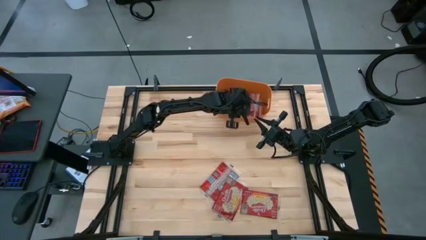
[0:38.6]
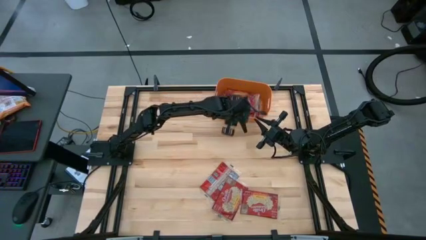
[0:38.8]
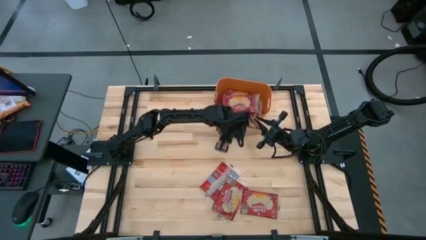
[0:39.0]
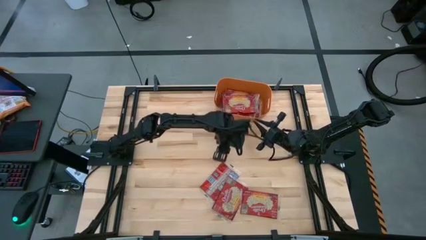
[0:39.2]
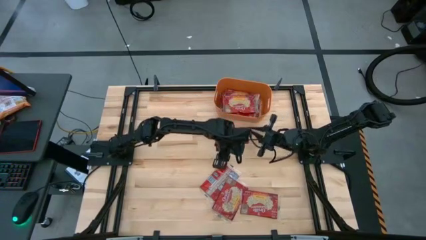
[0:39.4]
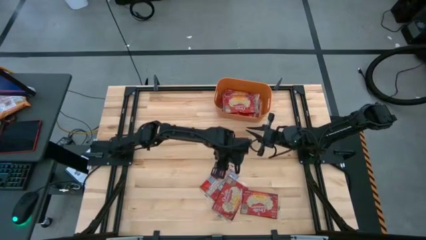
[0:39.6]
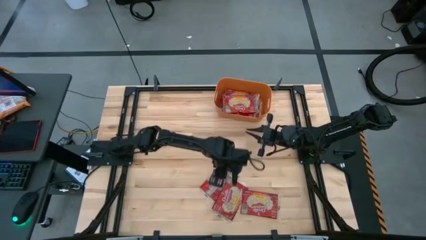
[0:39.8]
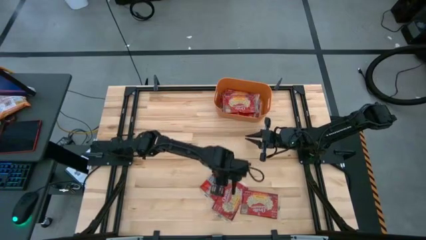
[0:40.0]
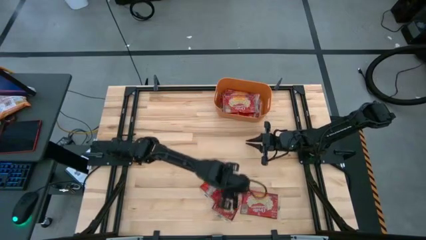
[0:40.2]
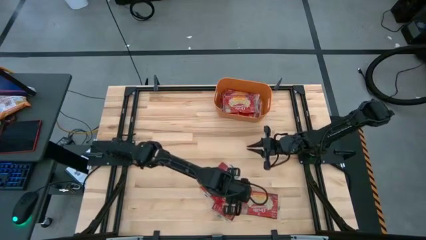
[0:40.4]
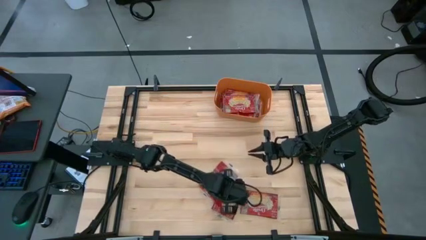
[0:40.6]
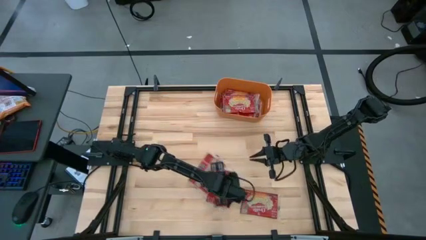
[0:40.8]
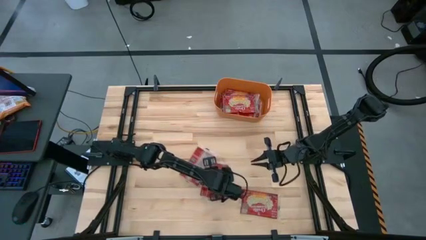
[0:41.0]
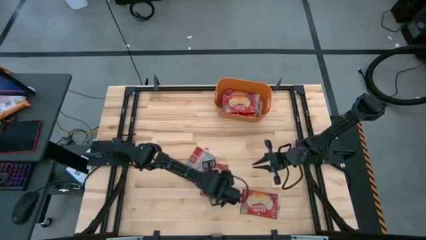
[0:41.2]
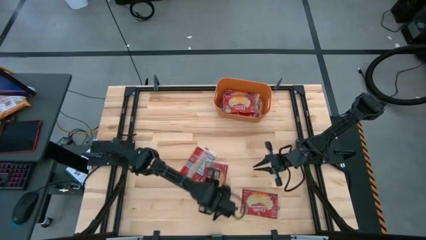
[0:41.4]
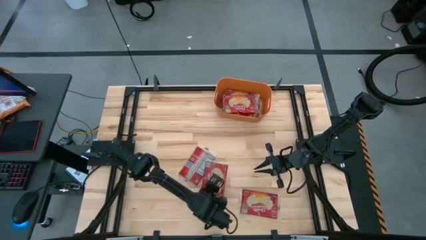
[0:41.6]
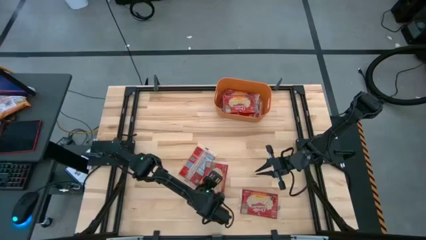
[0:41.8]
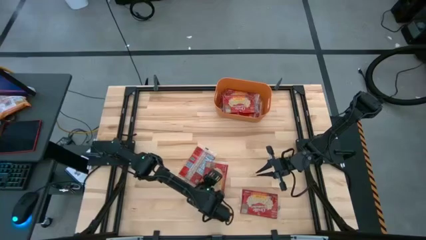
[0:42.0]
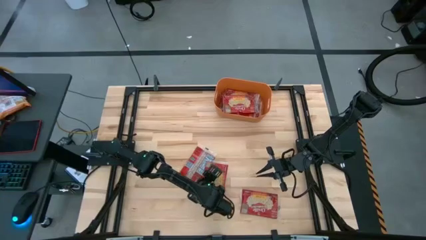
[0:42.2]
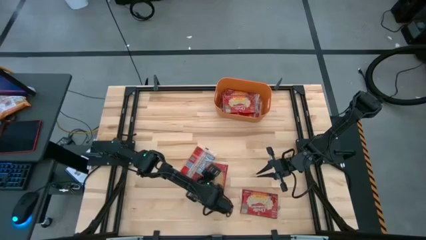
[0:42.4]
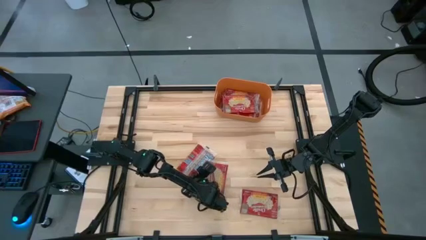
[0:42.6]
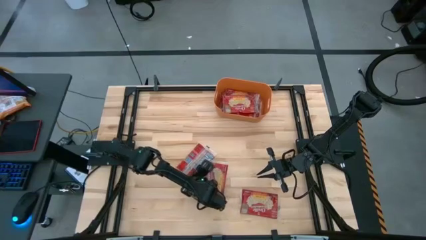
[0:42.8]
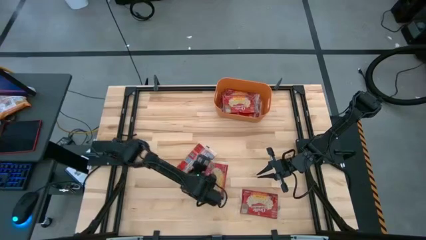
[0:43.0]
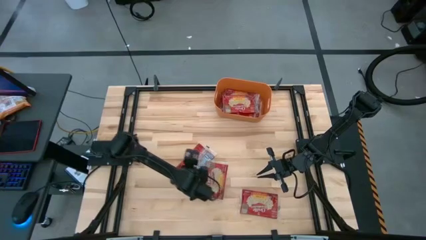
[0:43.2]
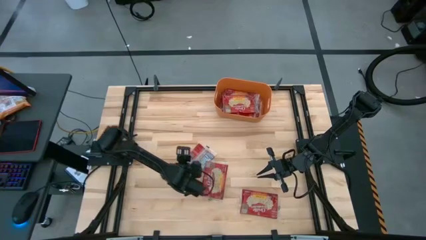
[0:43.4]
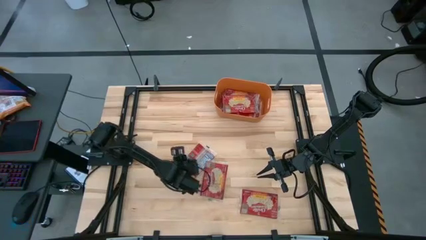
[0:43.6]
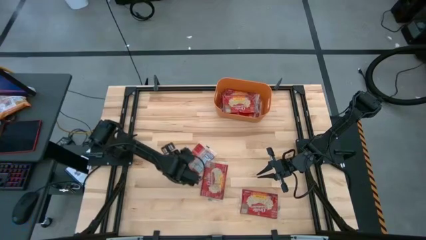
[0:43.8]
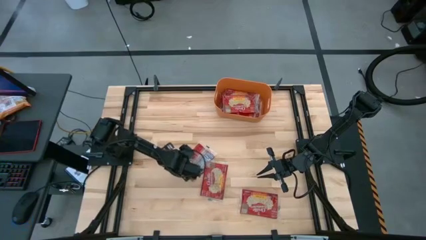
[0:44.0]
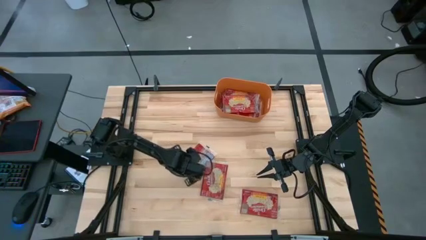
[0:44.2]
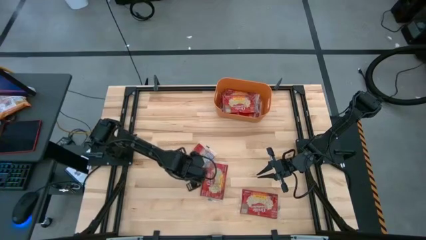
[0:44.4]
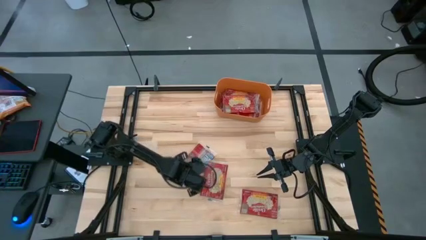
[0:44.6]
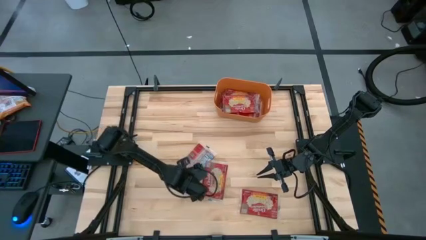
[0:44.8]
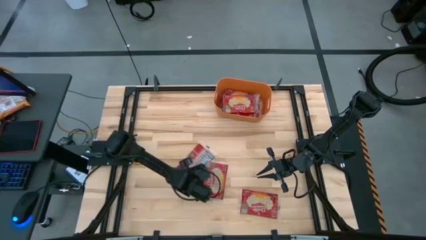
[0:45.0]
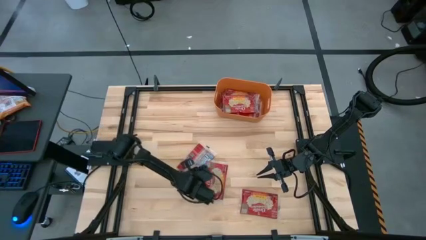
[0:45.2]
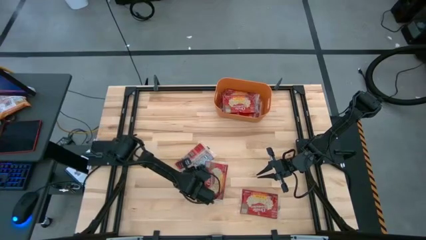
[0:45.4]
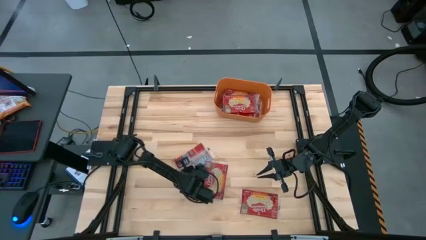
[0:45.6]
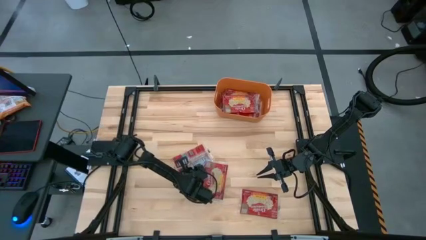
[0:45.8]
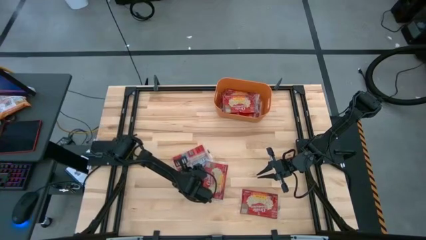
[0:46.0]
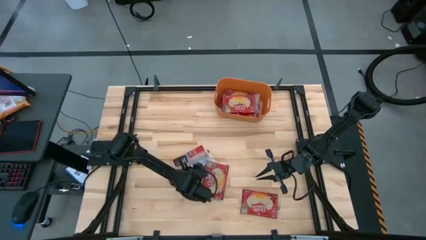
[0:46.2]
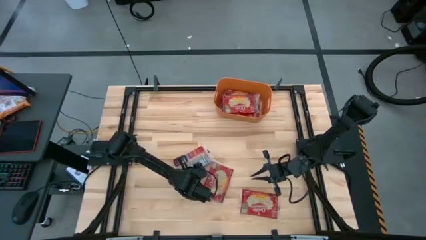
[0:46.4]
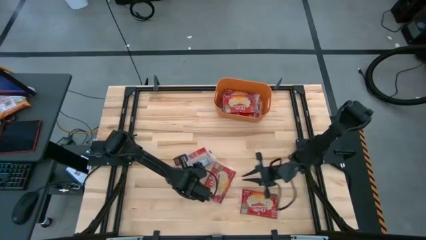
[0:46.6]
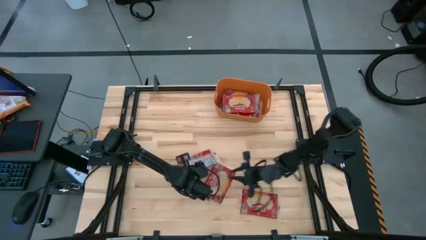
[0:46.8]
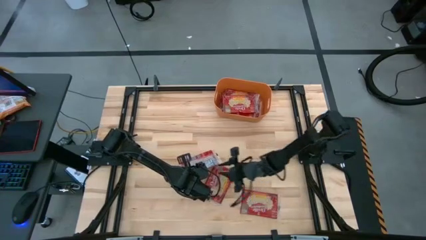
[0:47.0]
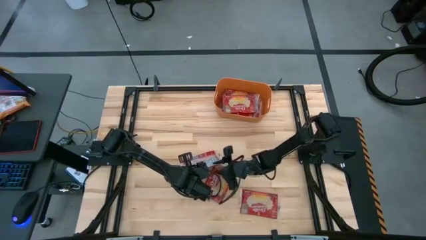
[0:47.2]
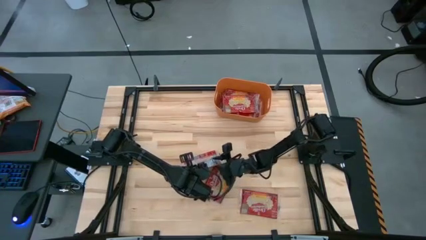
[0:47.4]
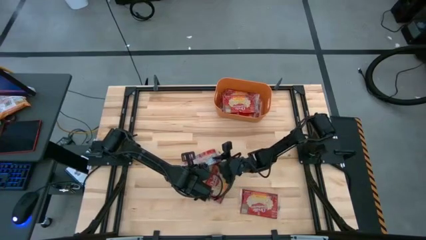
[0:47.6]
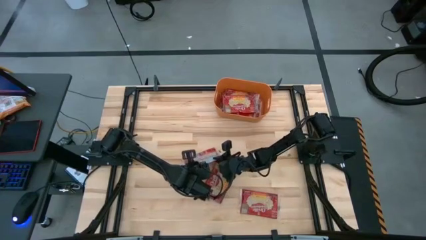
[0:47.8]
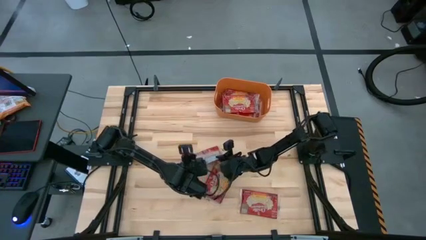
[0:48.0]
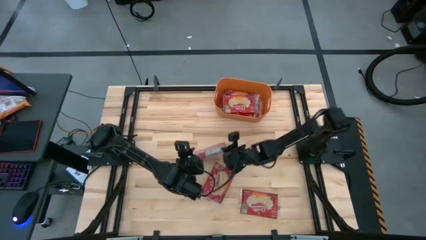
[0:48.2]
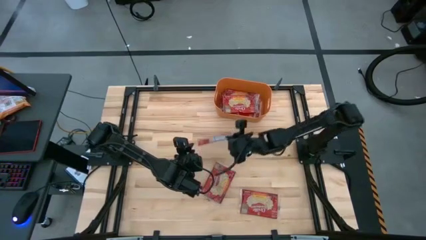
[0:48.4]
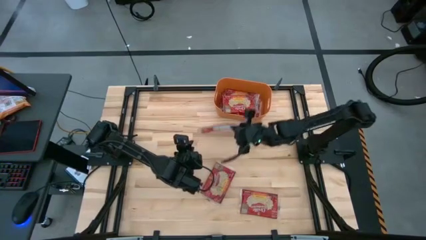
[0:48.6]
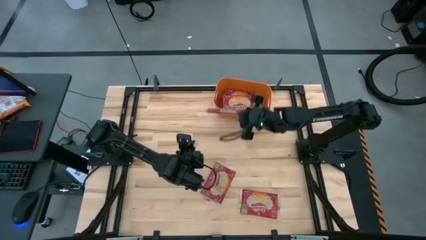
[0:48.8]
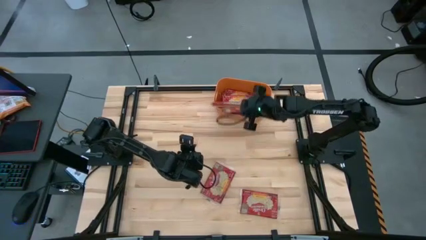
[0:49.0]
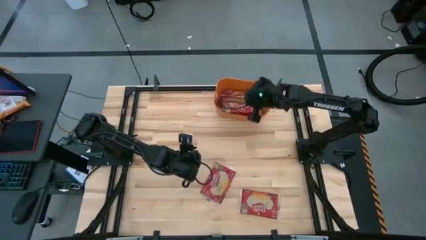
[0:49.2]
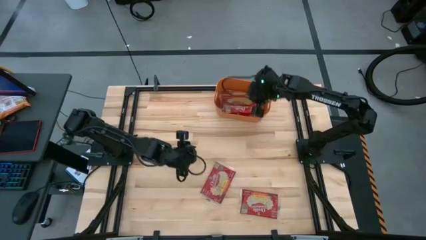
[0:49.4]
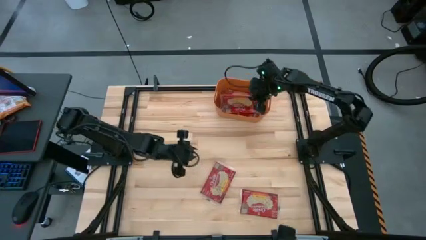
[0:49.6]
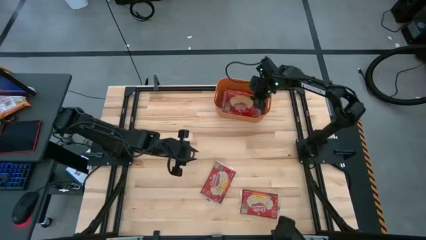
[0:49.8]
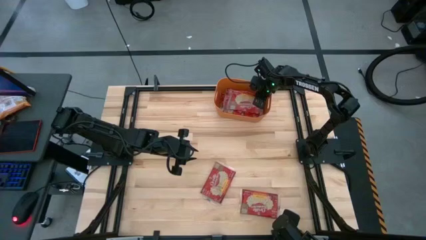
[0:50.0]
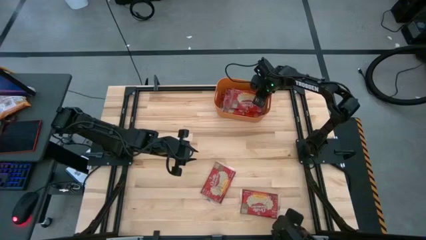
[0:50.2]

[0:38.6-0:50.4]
Task: Sort popcorn bags into baskets
Put the popcorn bag into the bin

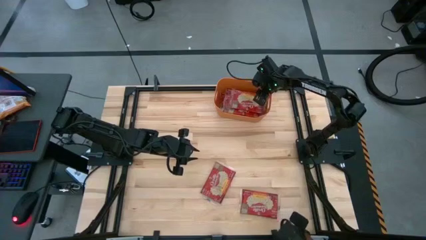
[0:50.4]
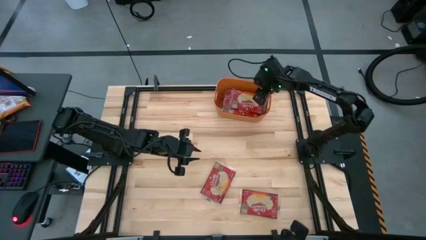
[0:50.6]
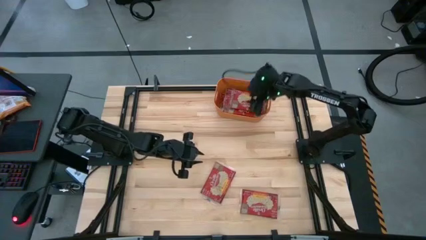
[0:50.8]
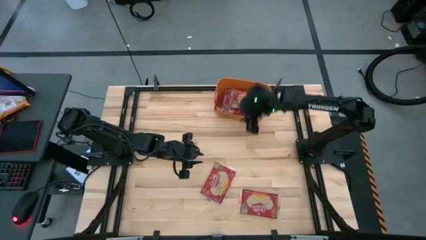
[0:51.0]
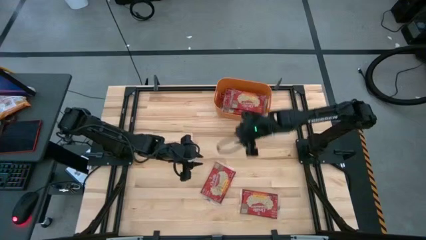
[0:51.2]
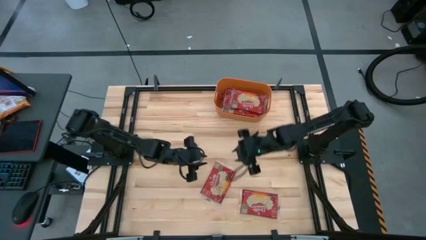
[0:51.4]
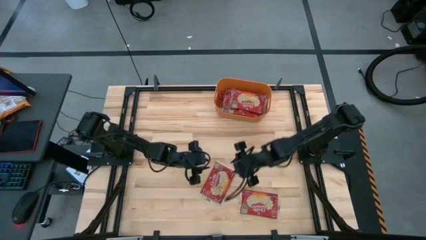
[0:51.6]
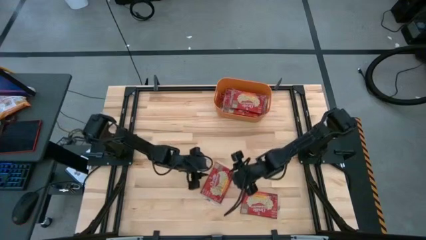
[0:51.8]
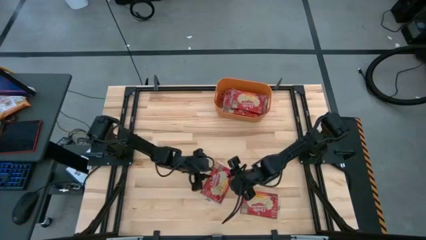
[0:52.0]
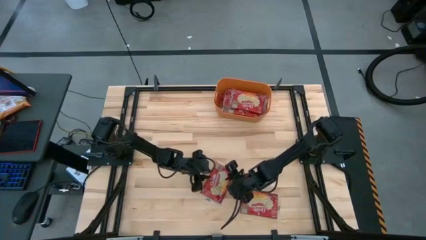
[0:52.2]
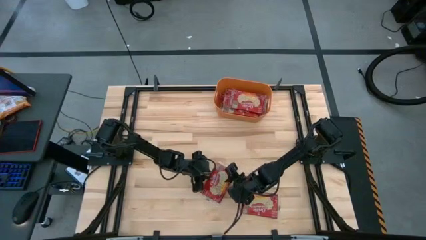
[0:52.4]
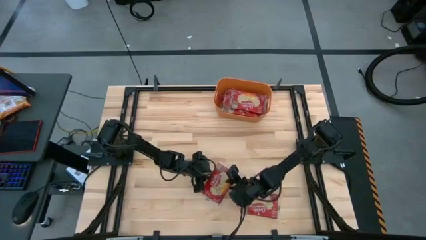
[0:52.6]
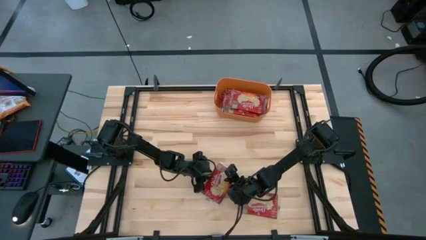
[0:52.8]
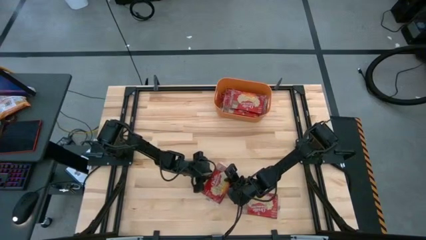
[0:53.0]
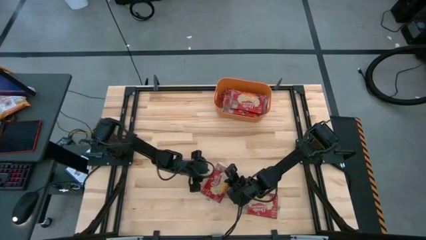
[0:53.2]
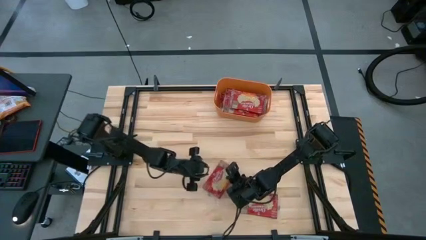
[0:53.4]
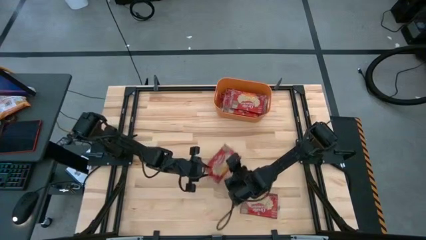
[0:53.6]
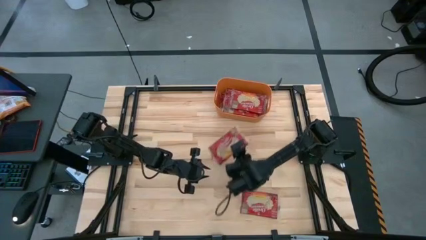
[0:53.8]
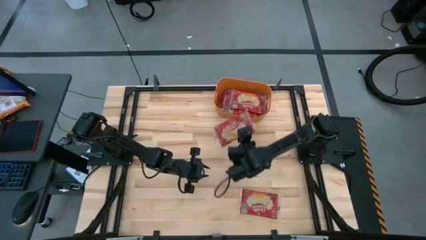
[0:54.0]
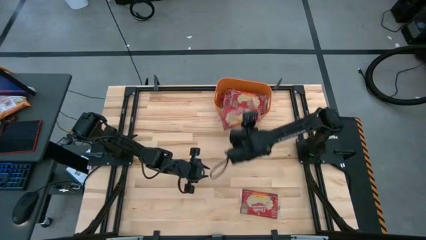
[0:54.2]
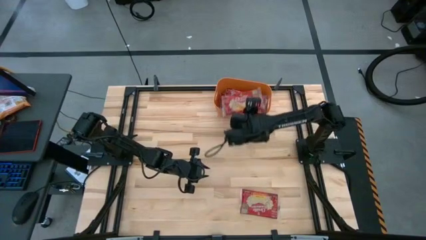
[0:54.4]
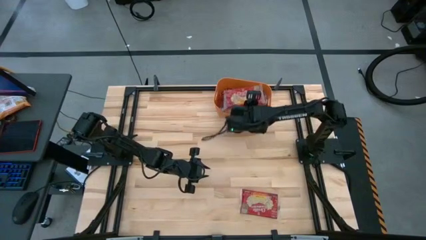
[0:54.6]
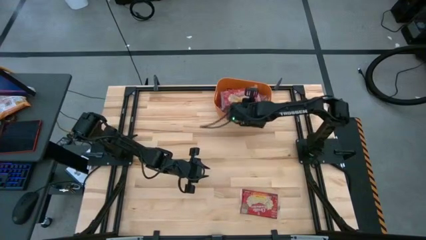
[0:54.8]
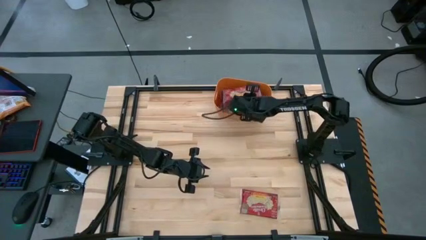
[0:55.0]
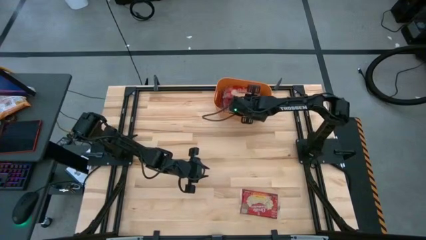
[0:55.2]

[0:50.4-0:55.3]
Put the popcorn bag into the bin
